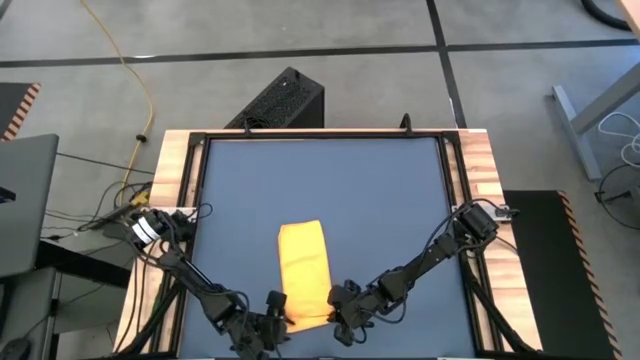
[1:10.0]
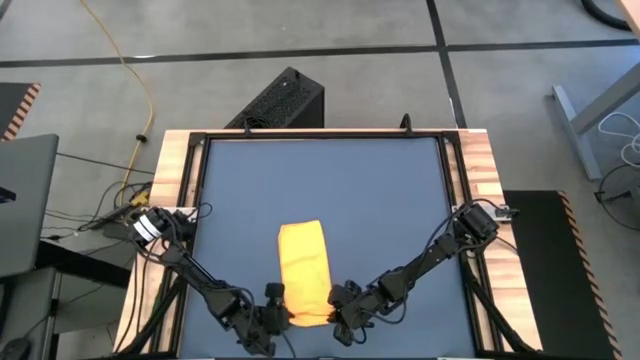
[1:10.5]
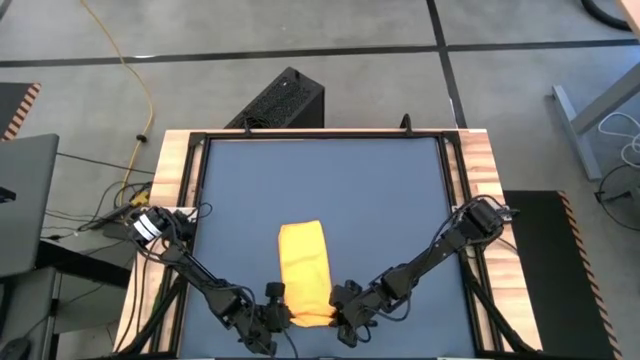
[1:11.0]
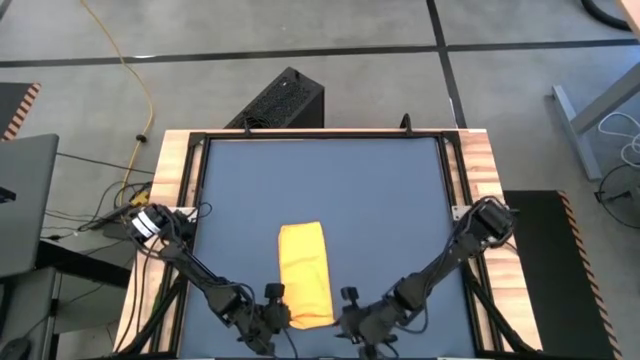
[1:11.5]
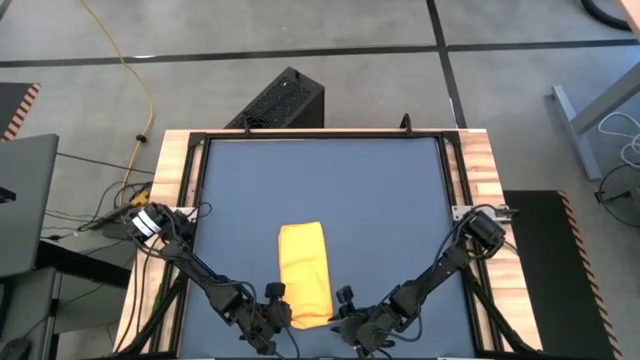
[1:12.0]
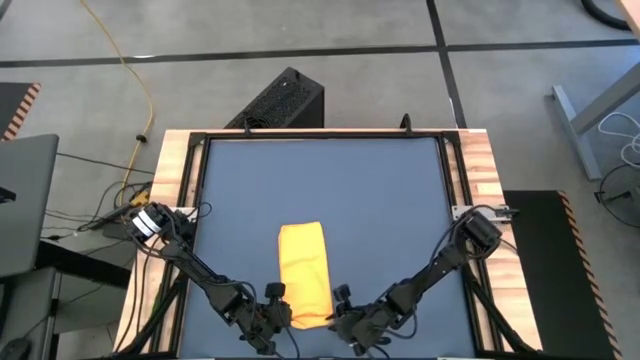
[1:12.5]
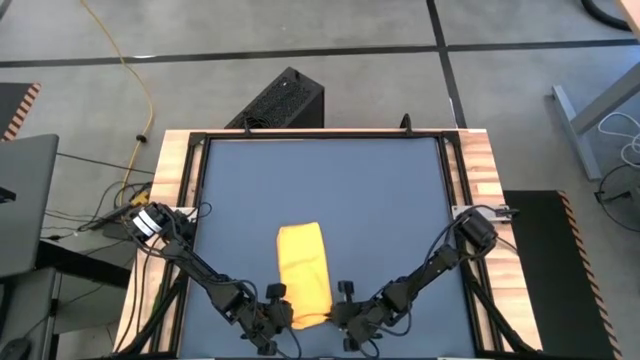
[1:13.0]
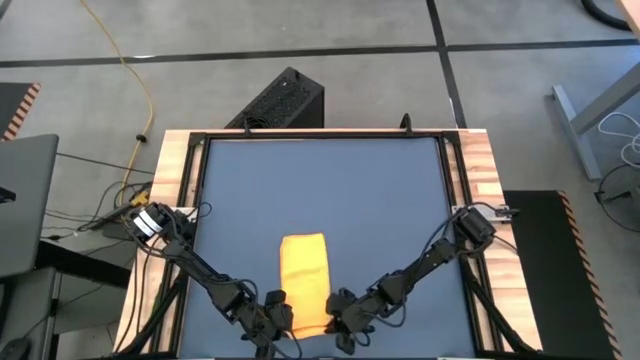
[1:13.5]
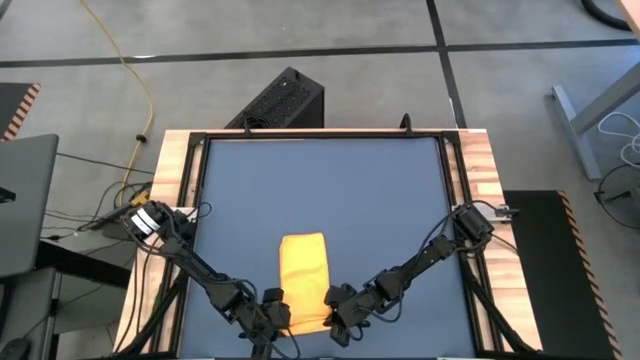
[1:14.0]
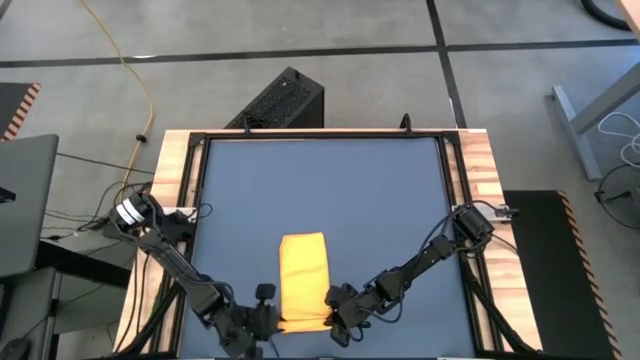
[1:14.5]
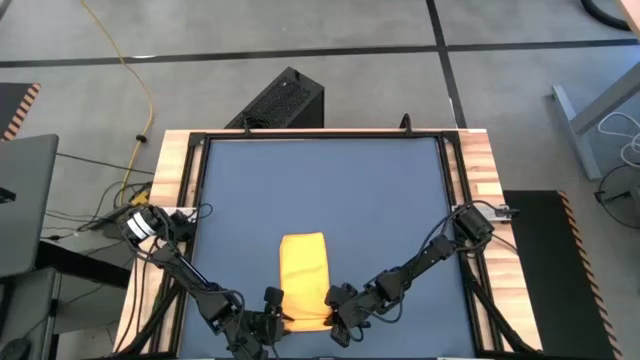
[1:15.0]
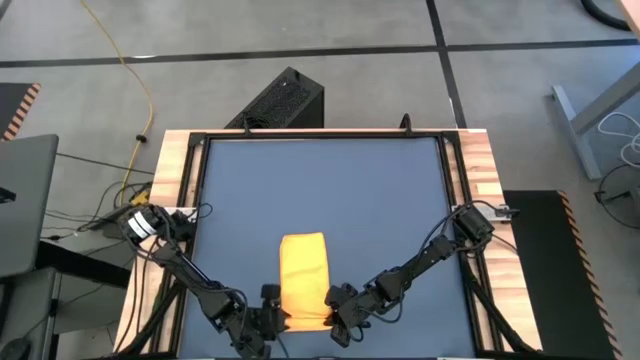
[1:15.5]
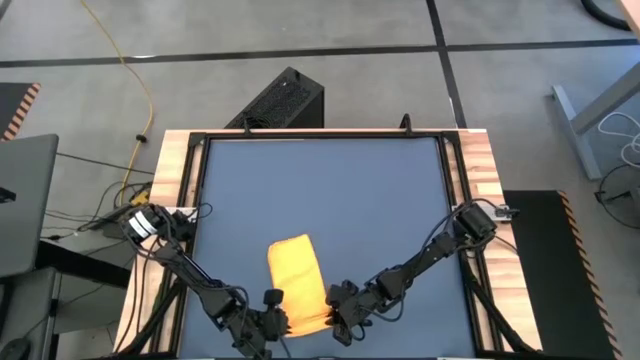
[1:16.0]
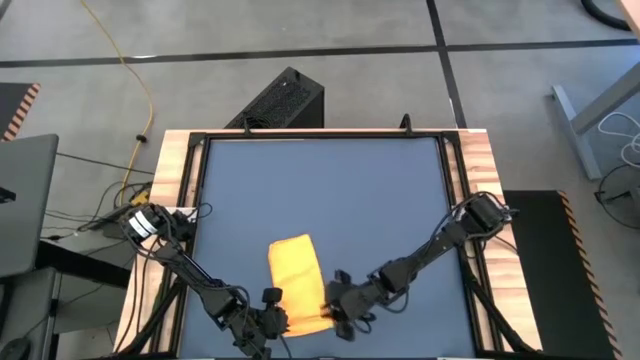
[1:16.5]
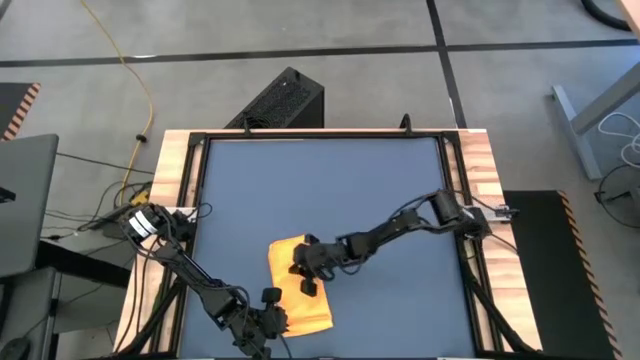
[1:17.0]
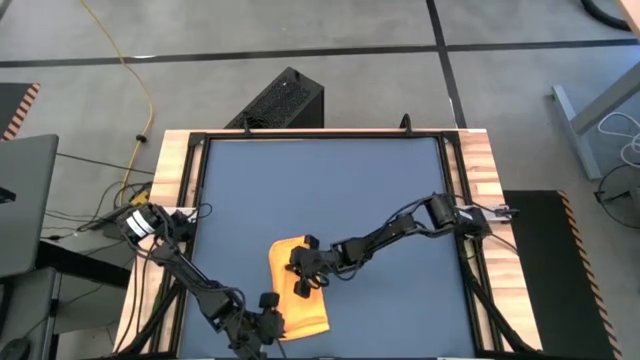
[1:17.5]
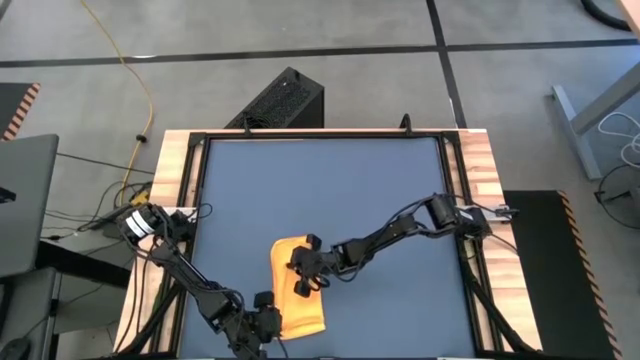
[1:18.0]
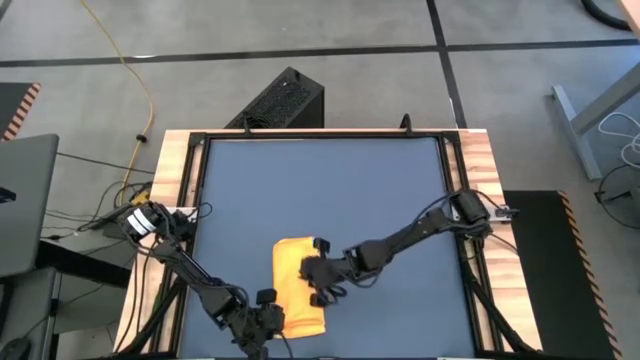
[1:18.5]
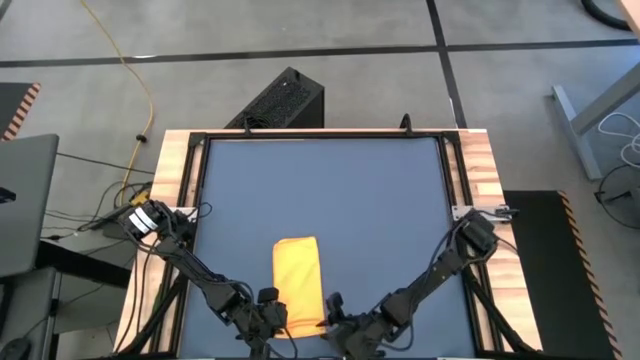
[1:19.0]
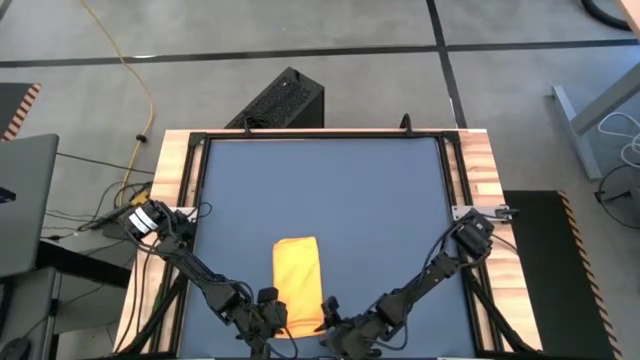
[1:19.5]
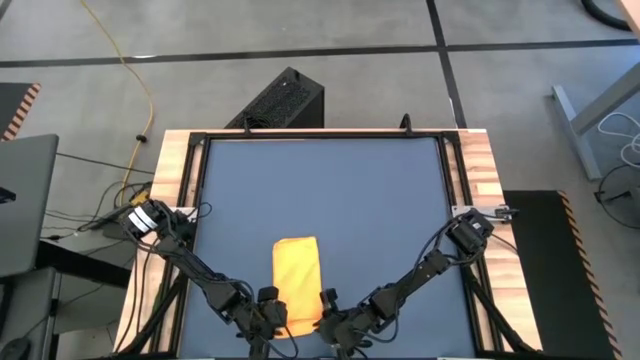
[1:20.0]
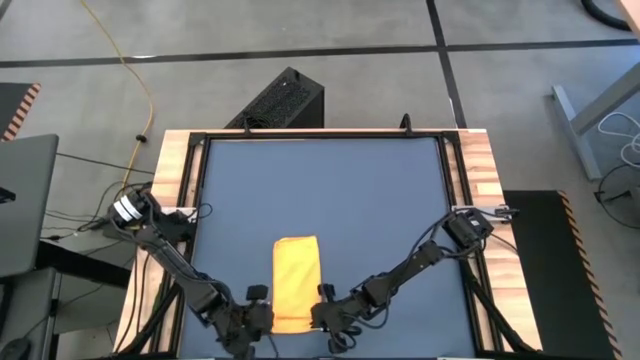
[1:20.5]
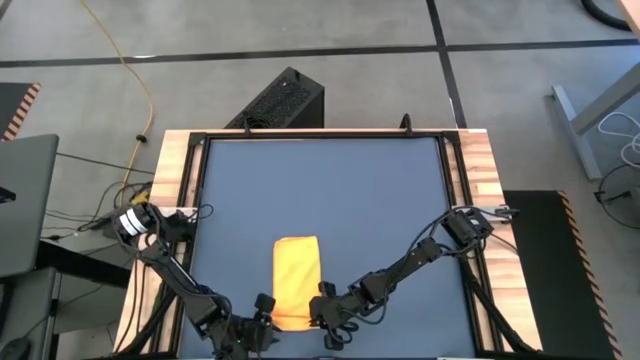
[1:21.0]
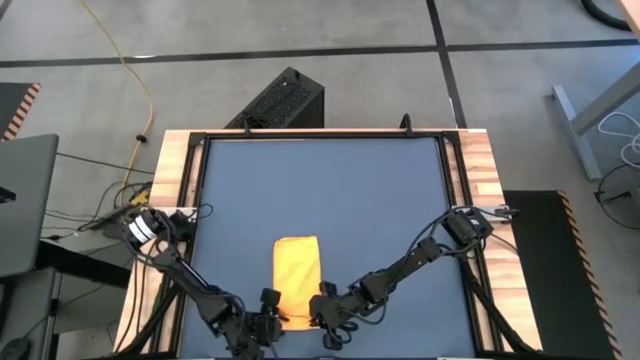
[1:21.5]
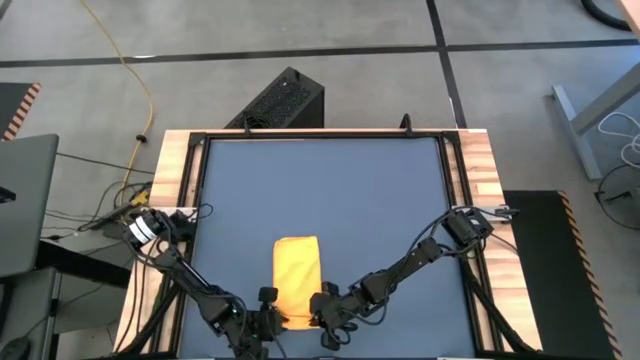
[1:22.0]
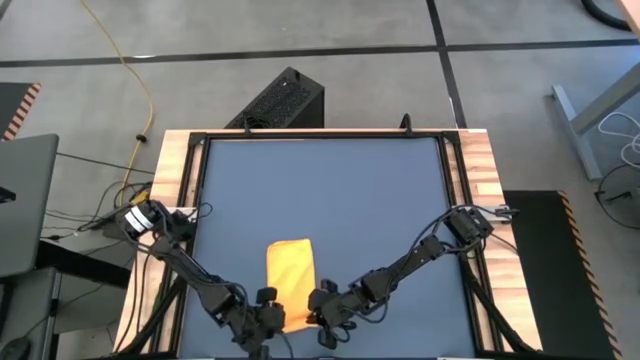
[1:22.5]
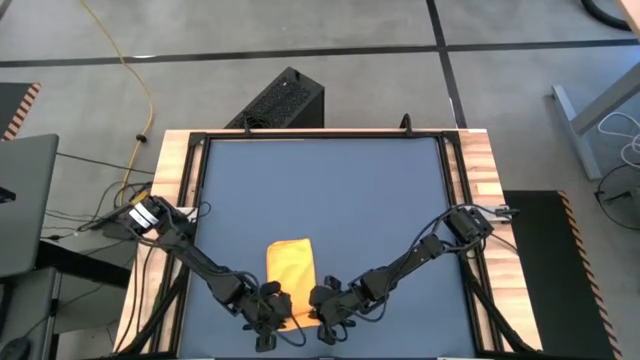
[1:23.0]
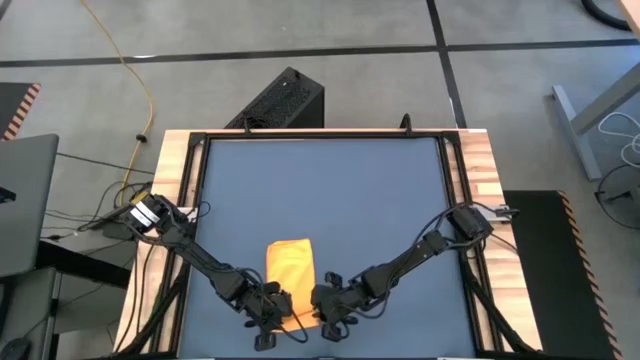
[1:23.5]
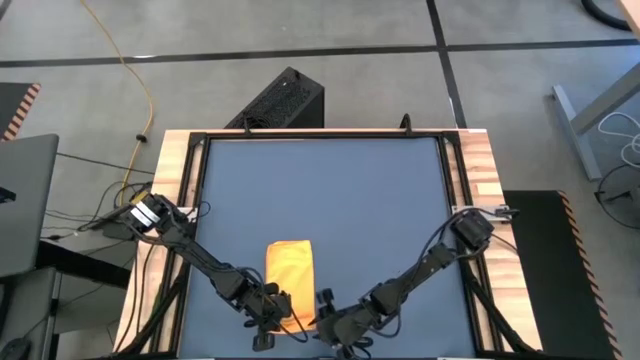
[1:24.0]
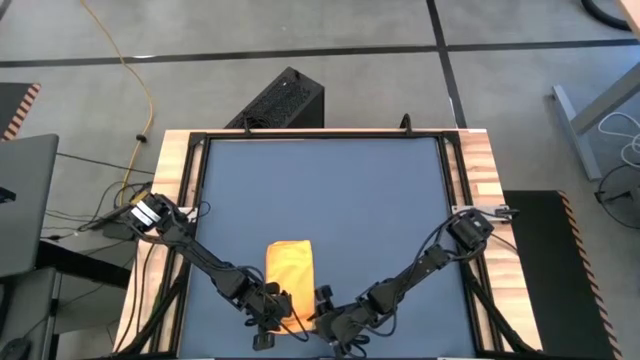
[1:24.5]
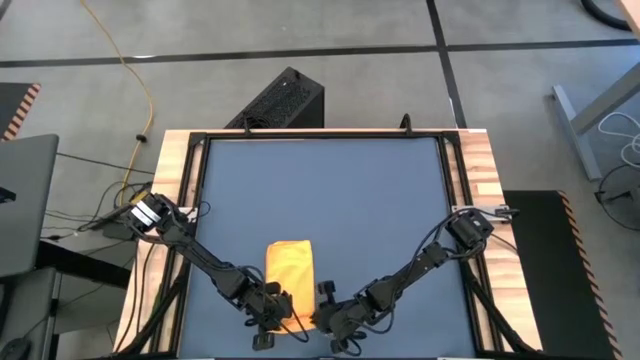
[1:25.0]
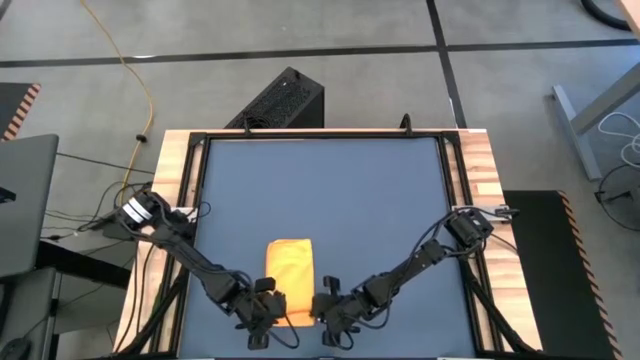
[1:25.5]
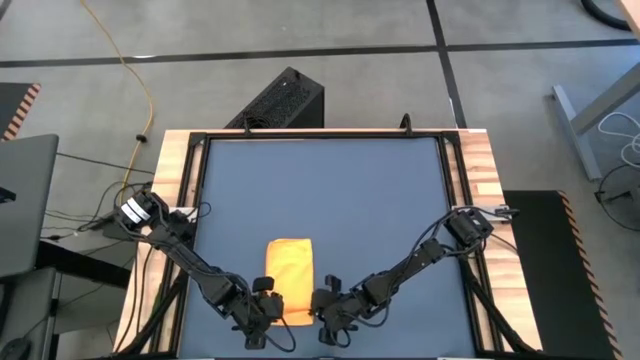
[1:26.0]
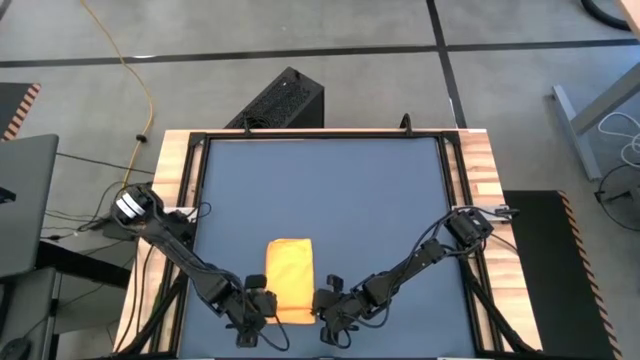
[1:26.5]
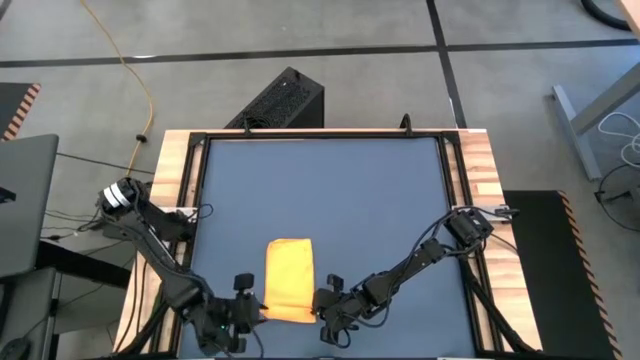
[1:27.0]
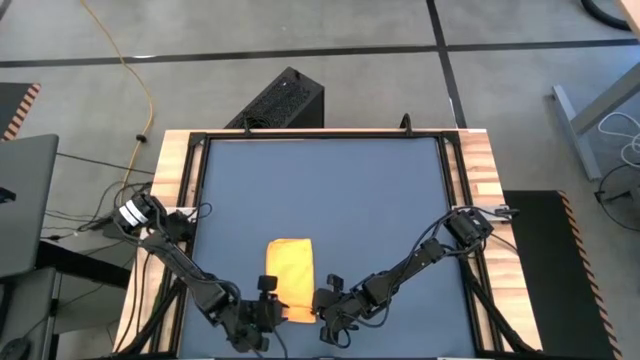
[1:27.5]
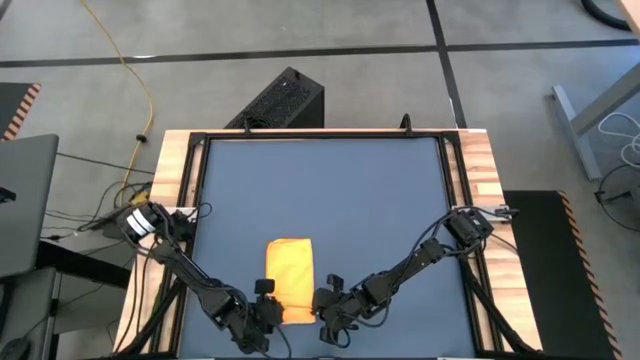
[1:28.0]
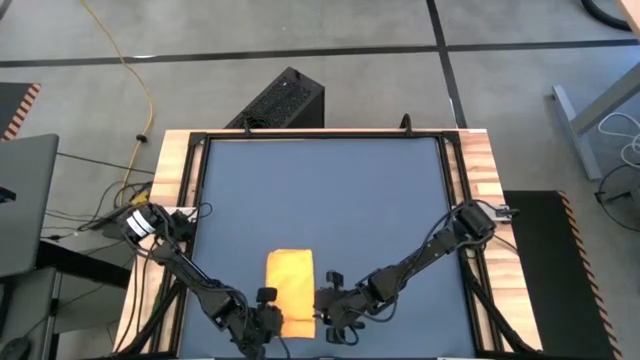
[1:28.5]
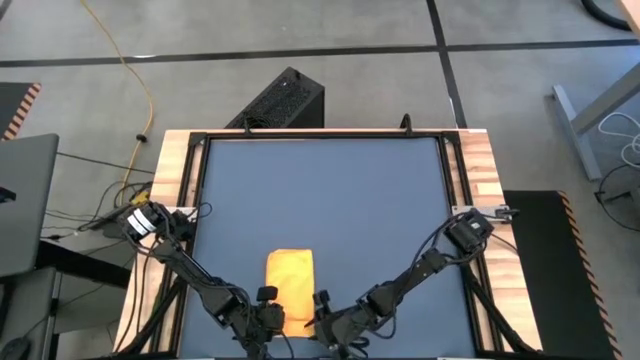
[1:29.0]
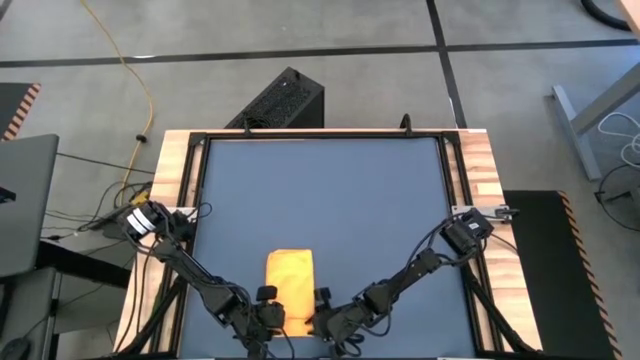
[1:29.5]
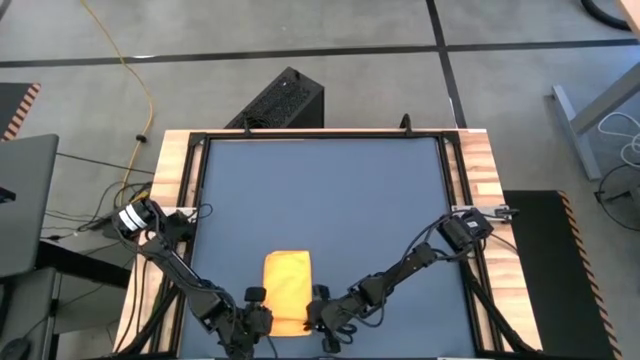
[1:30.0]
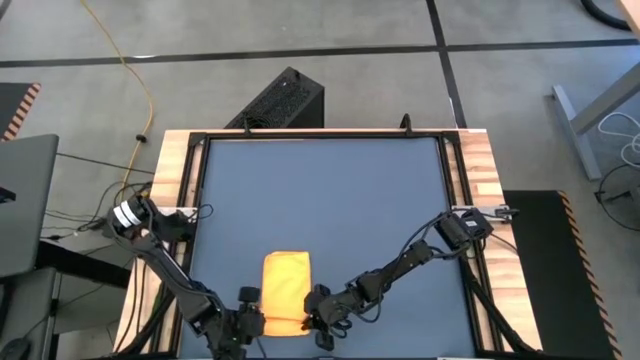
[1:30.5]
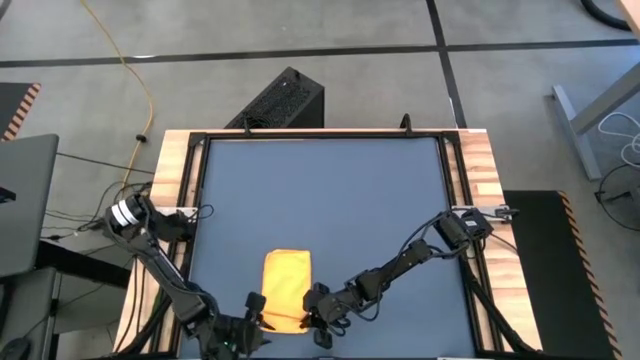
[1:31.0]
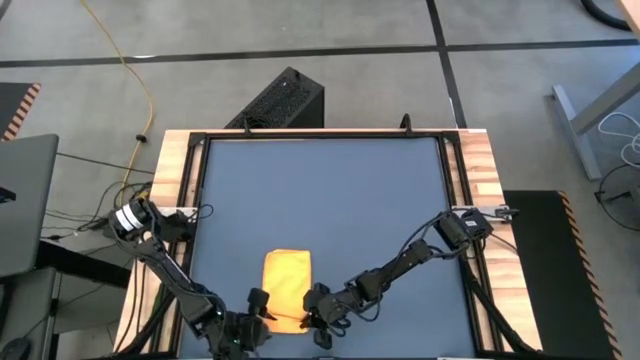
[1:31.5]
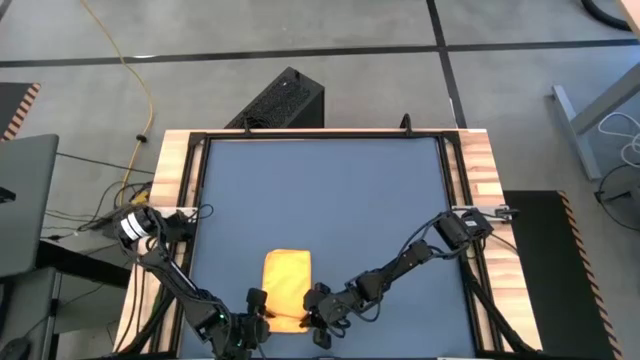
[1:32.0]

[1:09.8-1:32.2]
Task: Roll towel
Roll the orange microfiber towel
